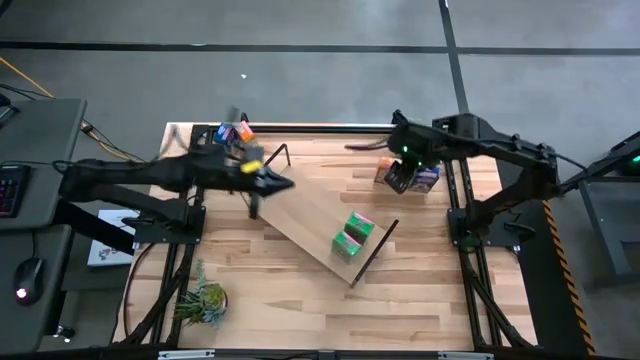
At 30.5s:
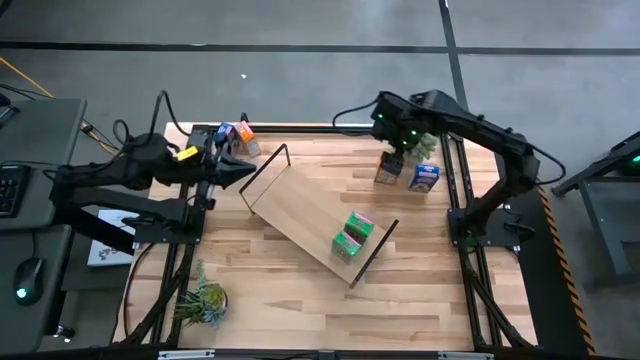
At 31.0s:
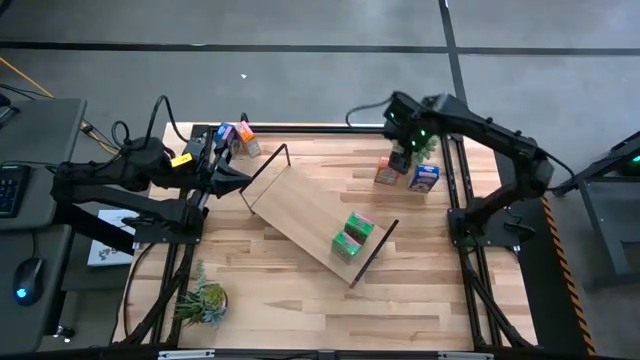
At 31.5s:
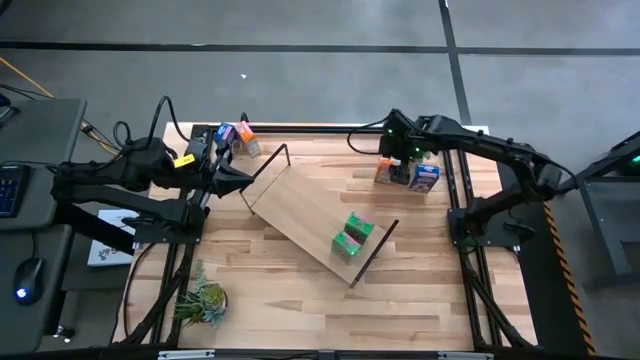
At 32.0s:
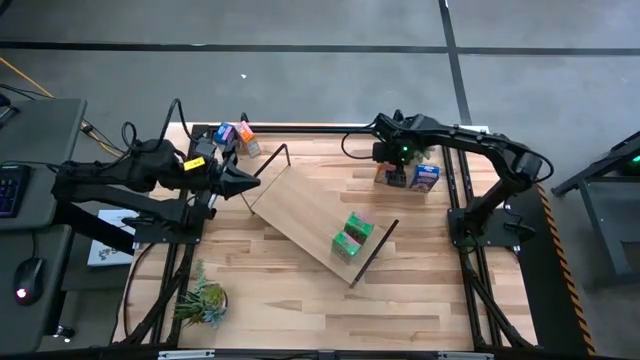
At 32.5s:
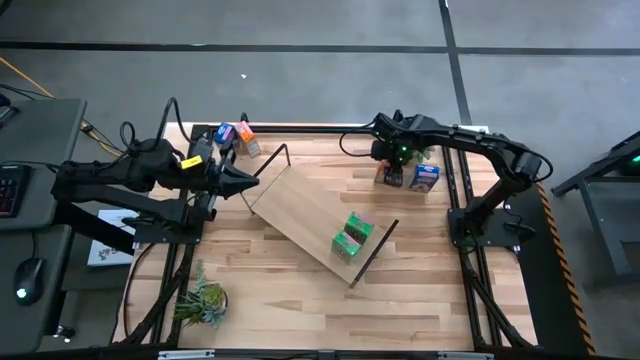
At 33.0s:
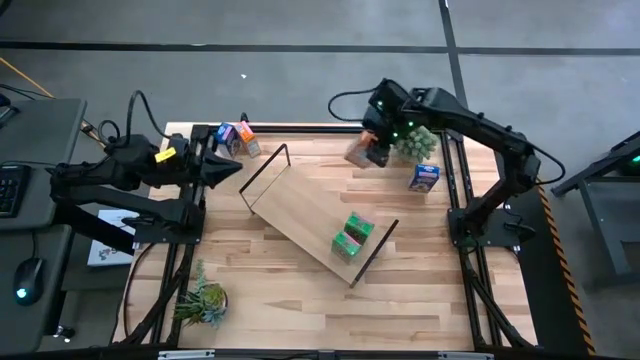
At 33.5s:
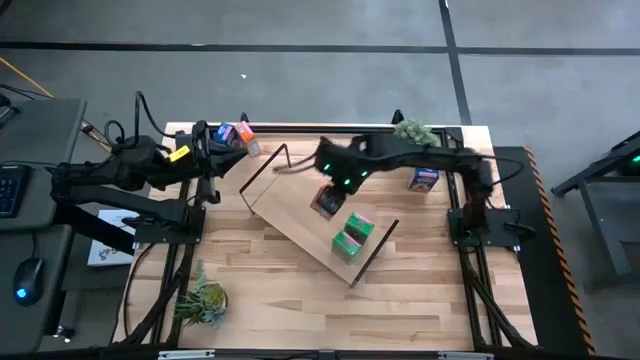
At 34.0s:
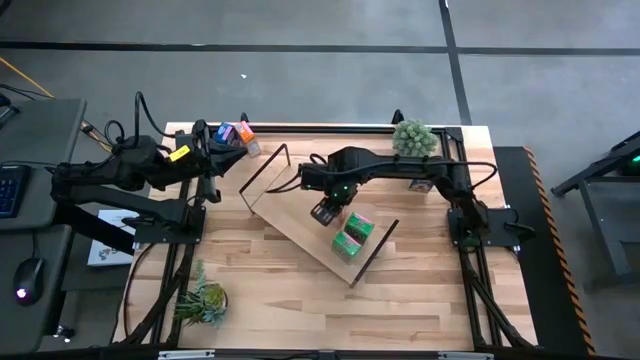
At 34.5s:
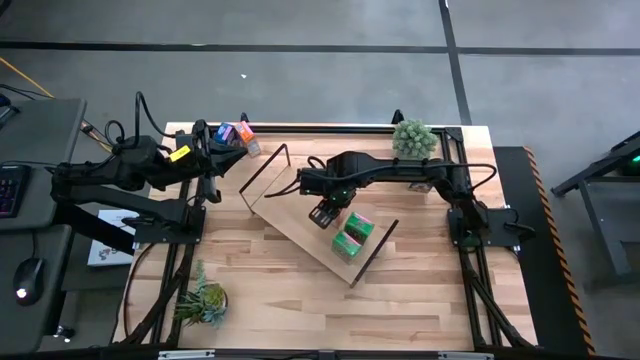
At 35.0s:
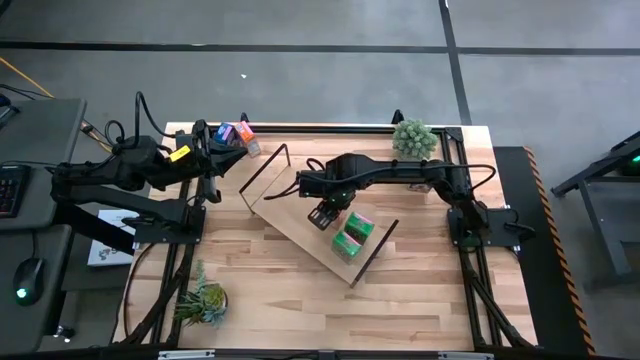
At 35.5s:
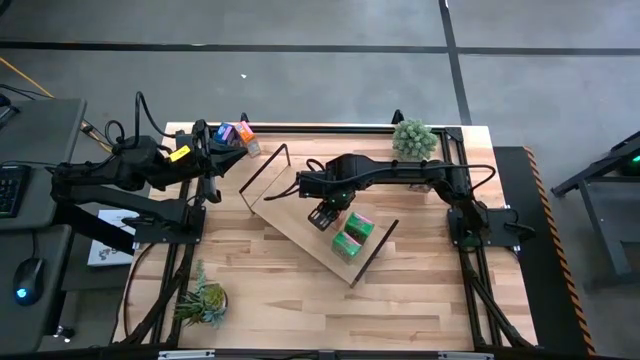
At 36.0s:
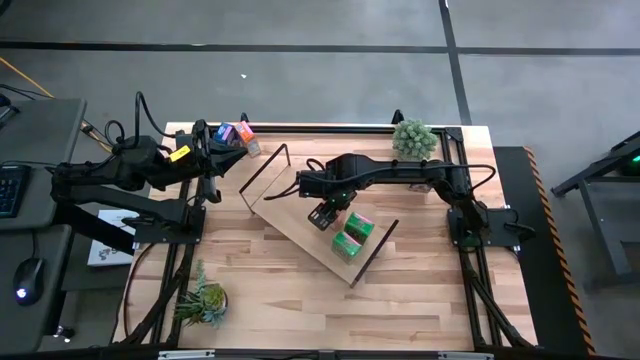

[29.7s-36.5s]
Task: Stack cereal on shelf
Put the right orange cereal box on the shelf

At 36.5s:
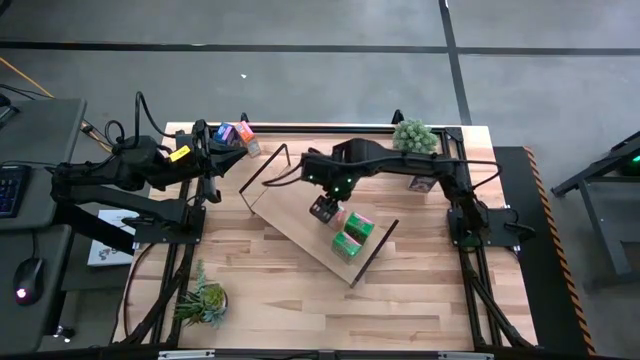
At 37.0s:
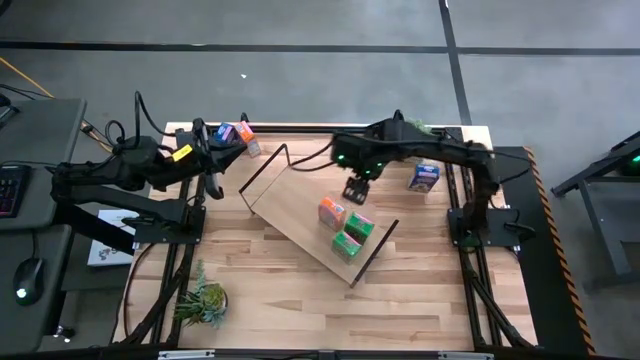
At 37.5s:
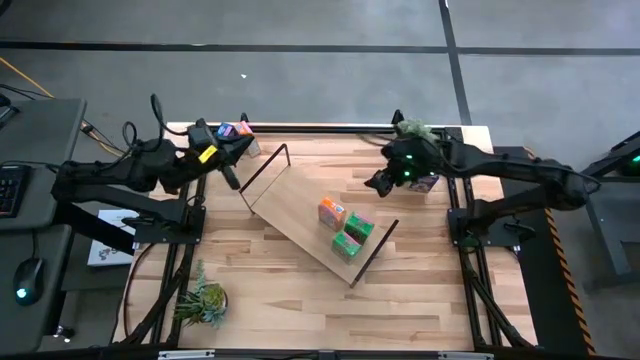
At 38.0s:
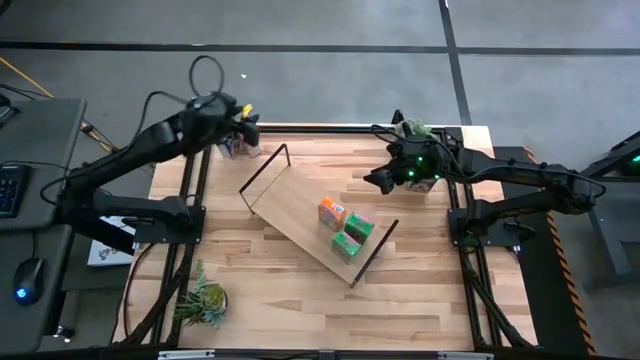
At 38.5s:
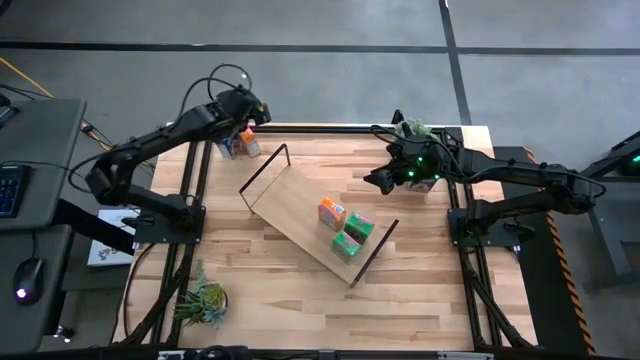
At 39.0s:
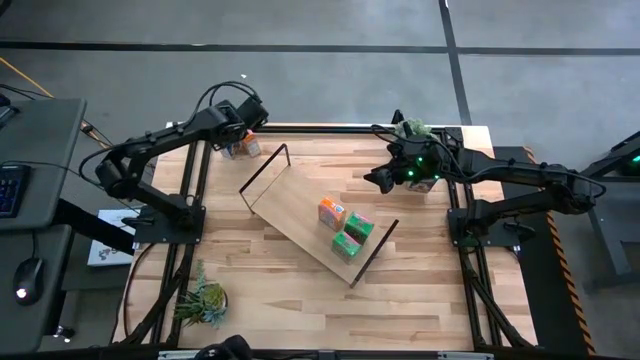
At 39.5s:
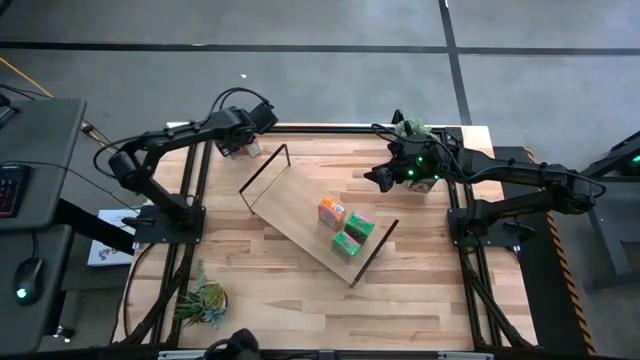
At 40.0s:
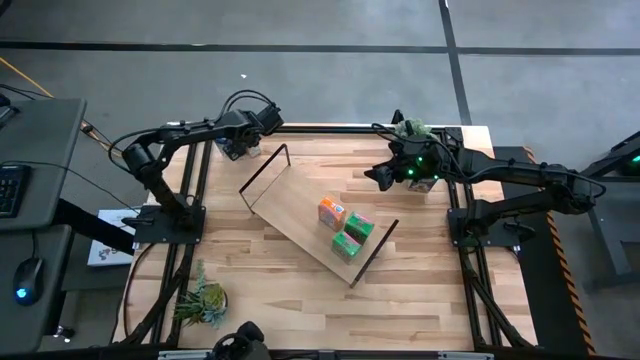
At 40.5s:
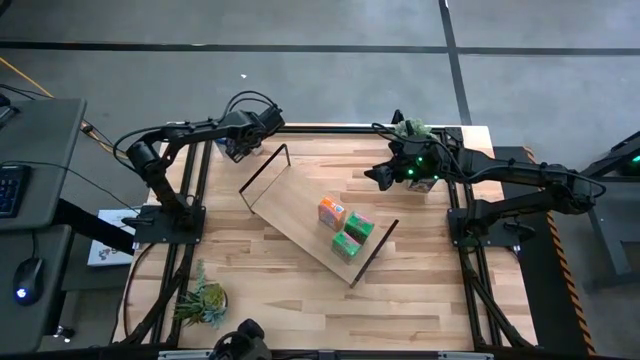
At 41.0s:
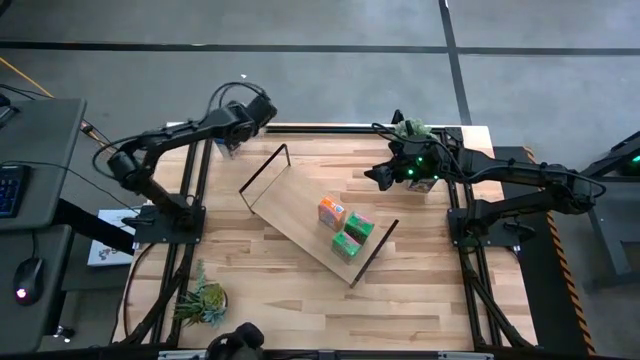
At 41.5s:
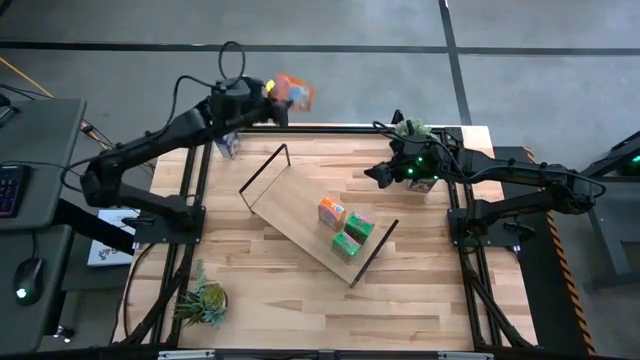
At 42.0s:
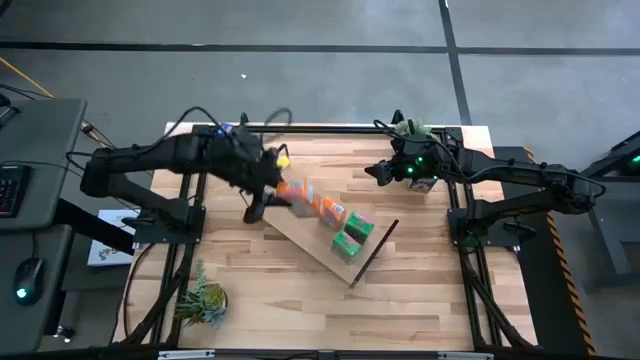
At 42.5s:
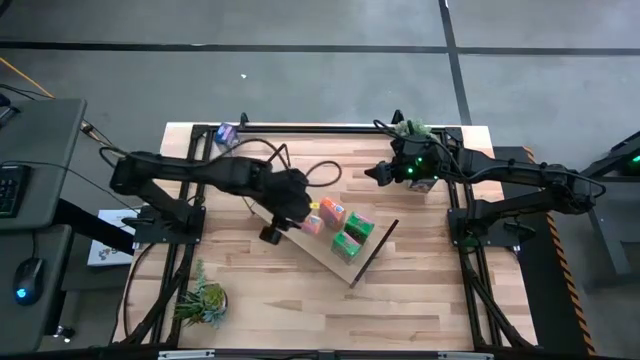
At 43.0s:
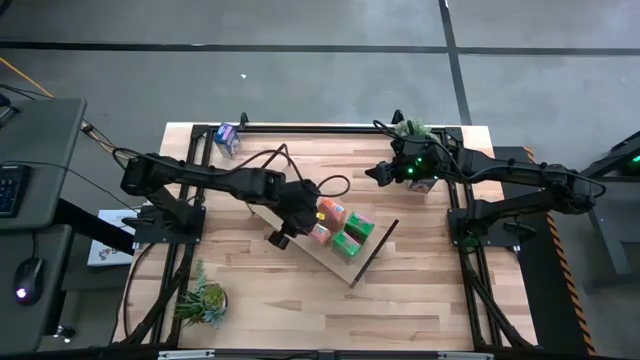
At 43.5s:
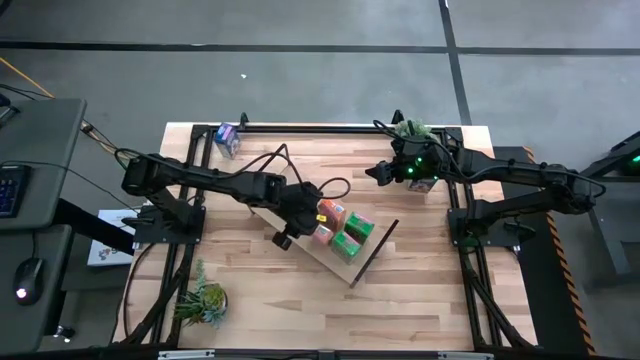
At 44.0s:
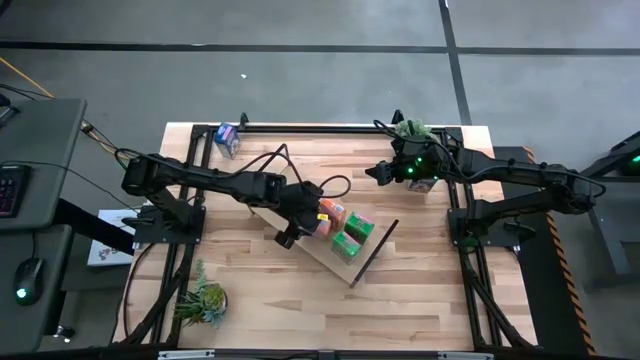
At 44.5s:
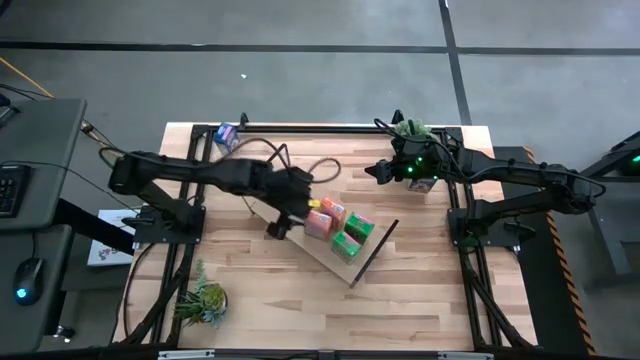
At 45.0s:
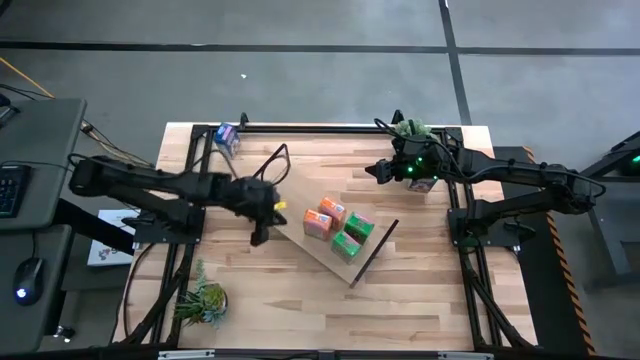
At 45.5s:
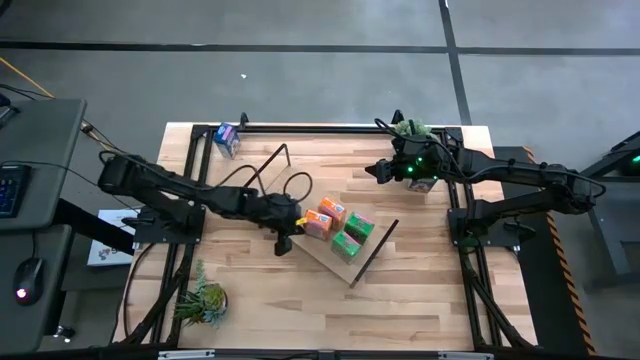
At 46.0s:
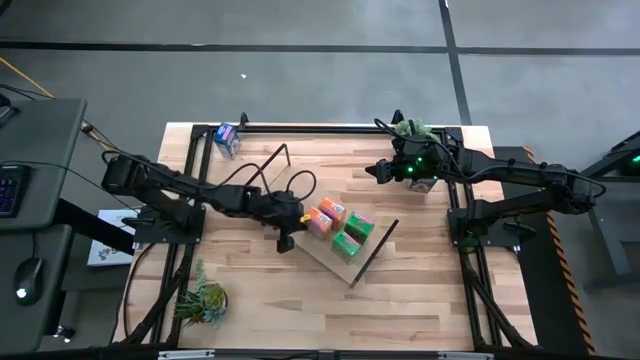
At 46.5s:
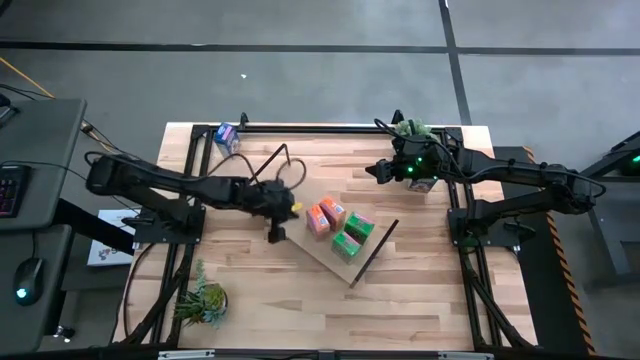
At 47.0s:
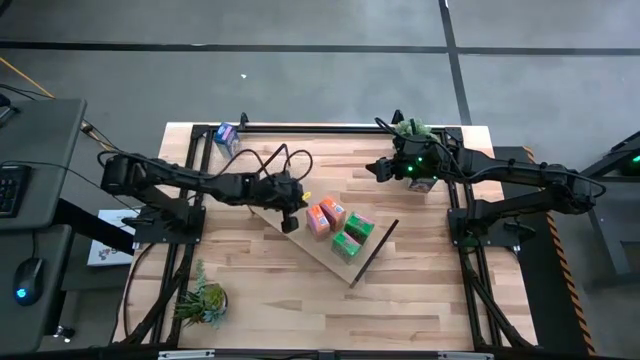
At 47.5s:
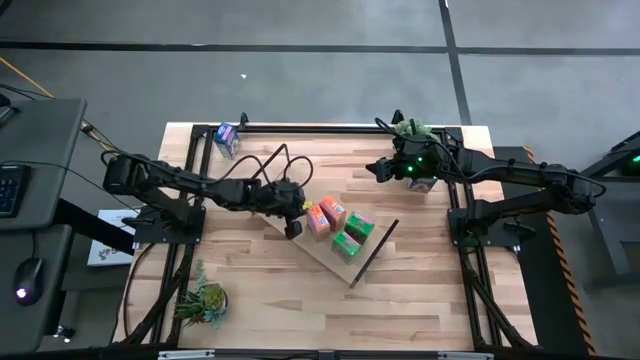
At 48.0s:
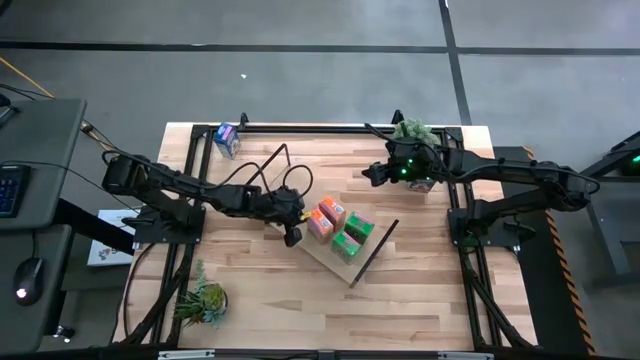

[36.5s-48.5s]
Put the orange cereal box on the shelf aligned with the orange cereal box

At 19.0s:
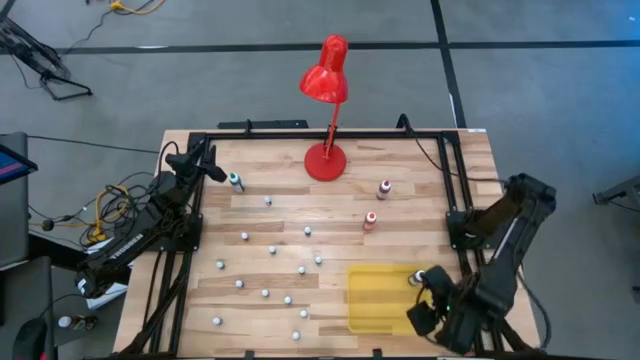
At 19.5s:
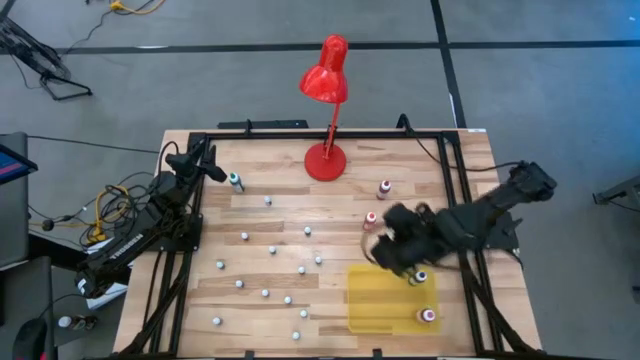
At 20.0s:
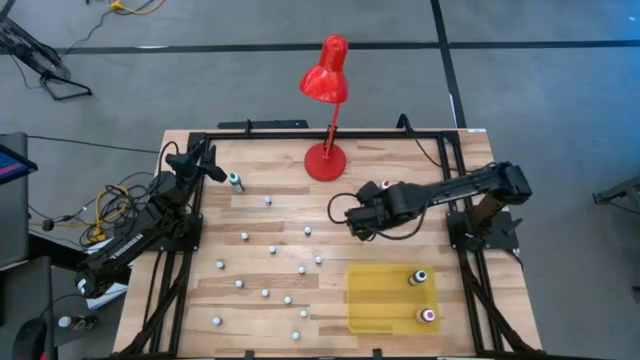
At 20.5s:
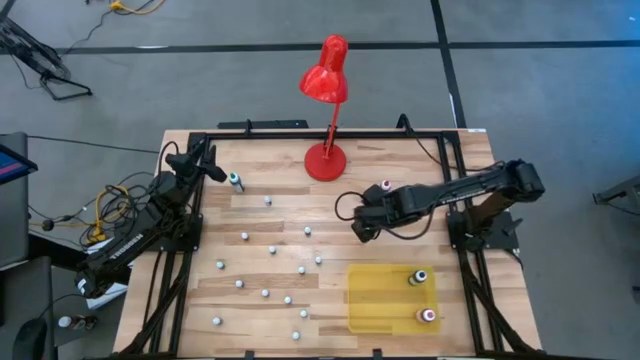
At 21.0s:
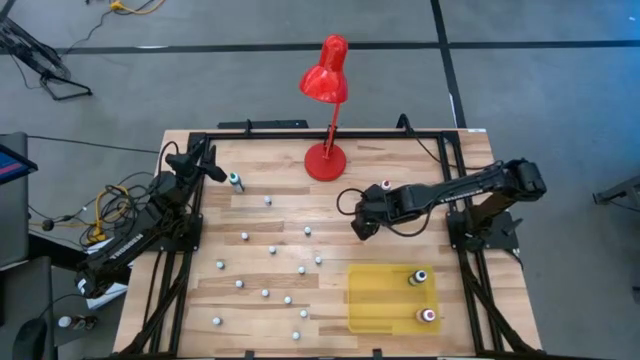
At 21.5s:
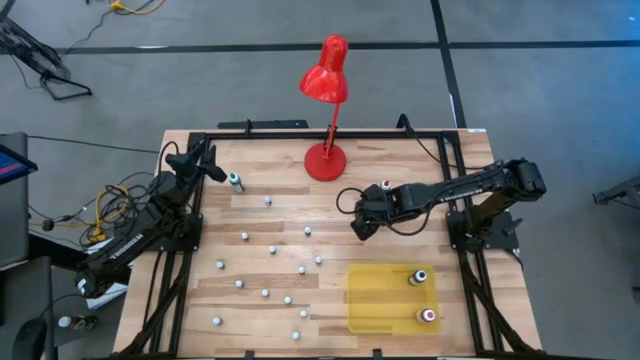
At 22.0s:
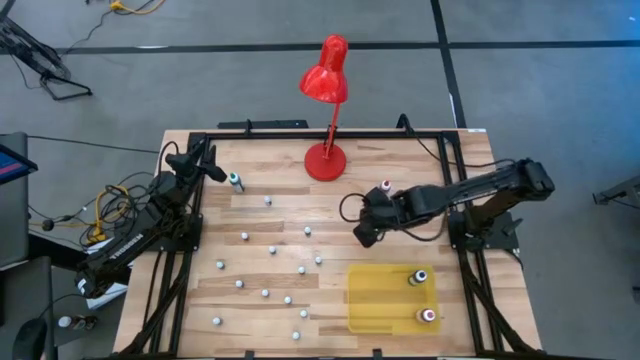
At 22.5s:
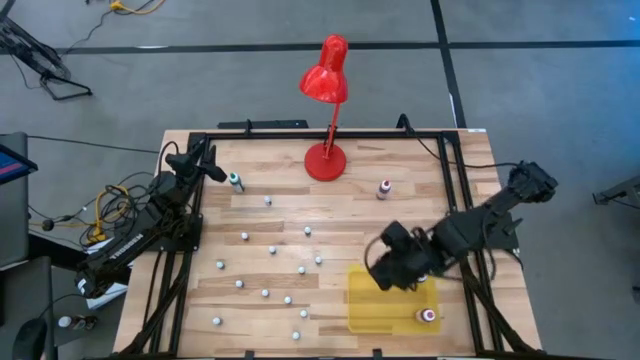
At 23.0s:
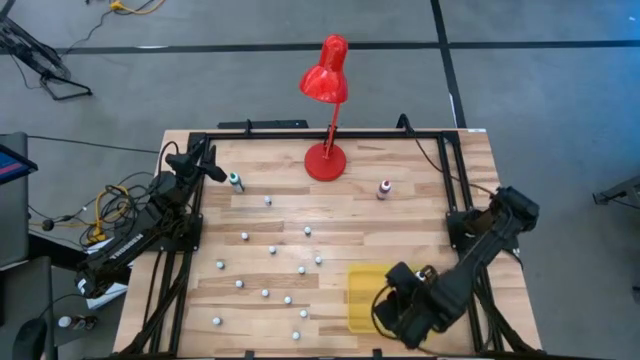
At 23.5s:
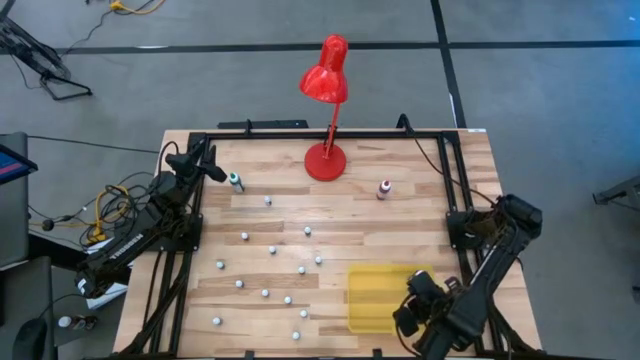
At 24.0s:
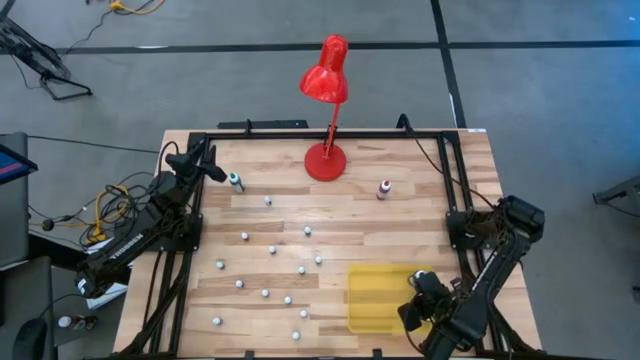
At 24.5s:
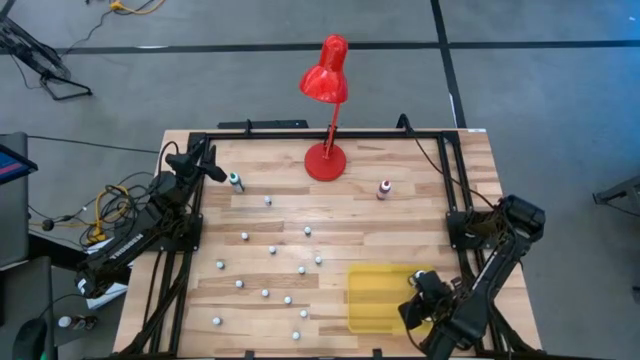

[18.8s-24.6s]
Task: Pick & Place food coloring
Put the large orange food coloring into the yellow bin
